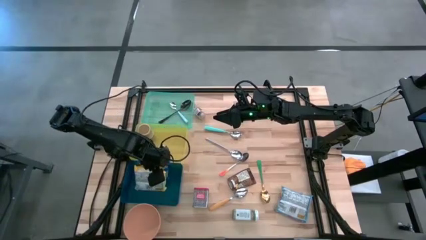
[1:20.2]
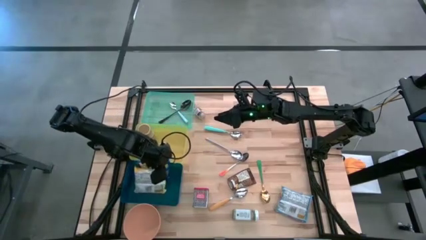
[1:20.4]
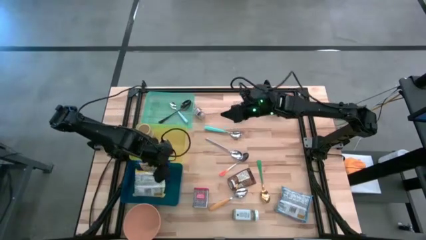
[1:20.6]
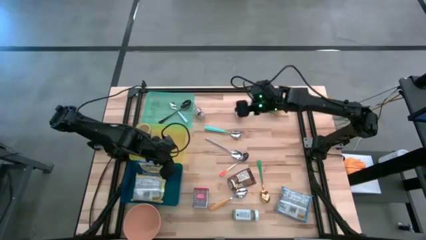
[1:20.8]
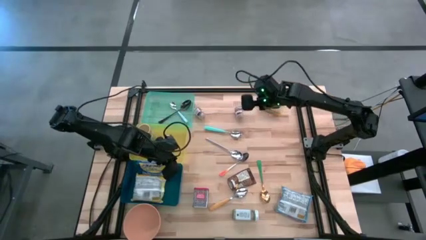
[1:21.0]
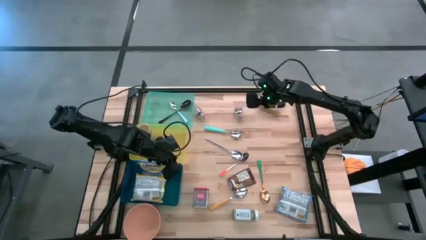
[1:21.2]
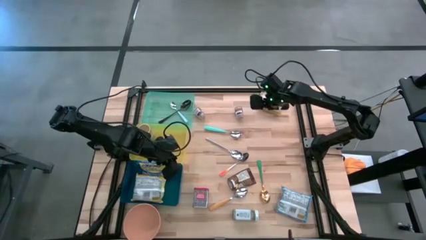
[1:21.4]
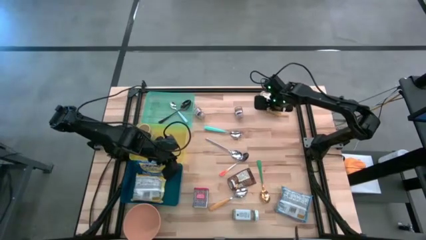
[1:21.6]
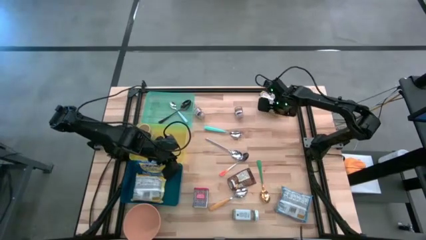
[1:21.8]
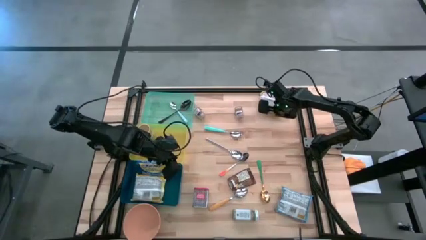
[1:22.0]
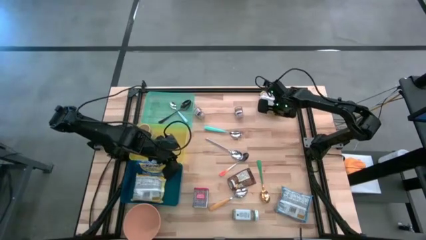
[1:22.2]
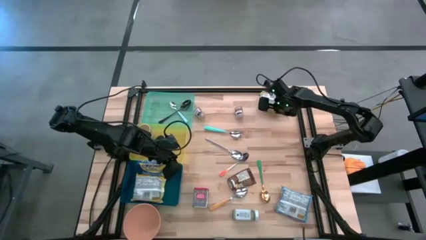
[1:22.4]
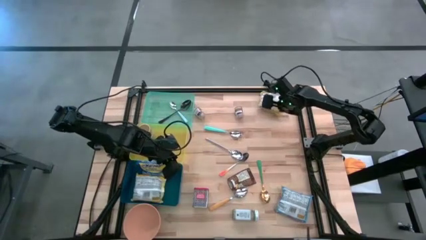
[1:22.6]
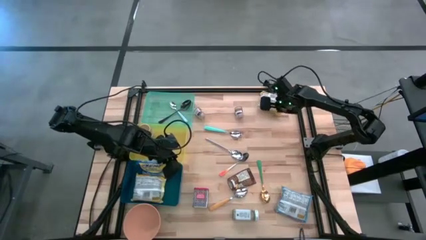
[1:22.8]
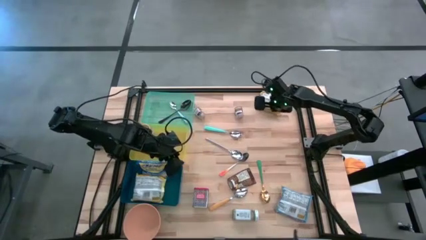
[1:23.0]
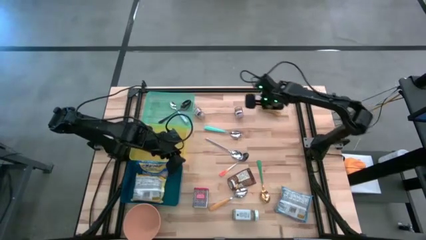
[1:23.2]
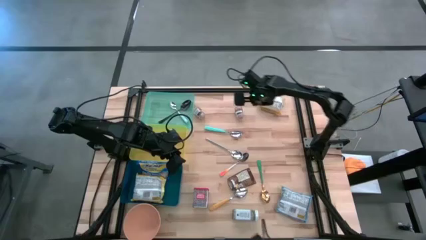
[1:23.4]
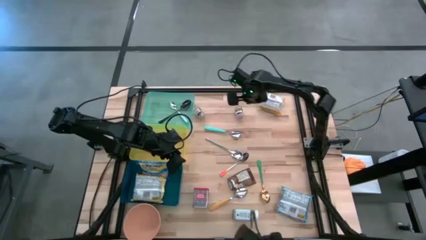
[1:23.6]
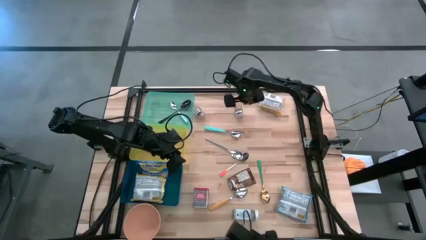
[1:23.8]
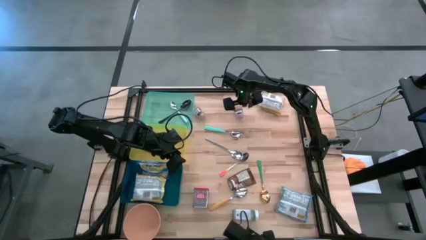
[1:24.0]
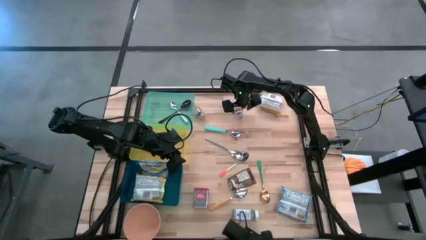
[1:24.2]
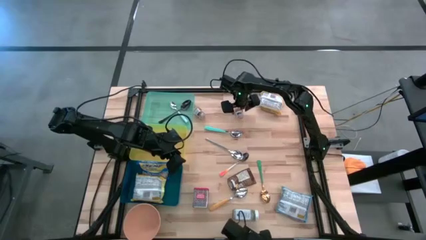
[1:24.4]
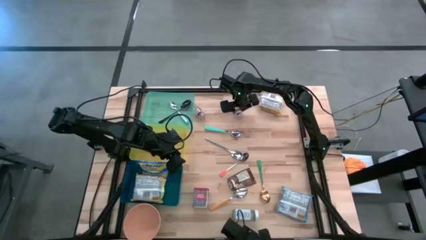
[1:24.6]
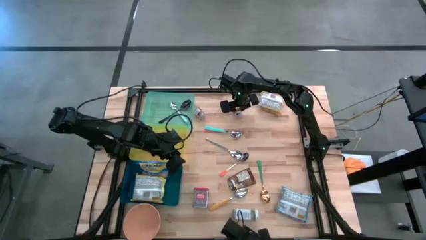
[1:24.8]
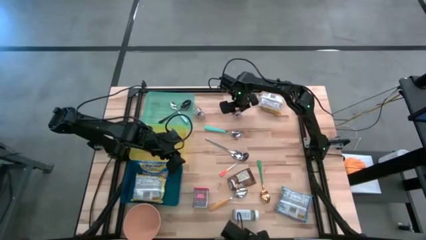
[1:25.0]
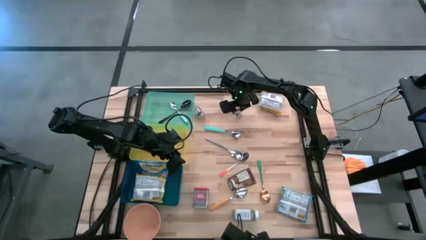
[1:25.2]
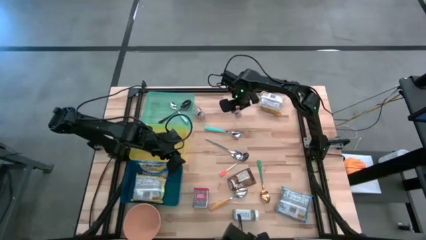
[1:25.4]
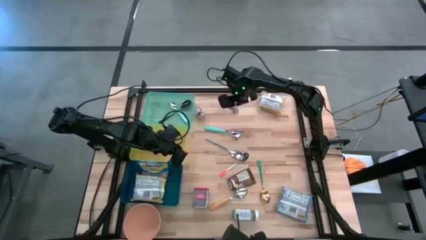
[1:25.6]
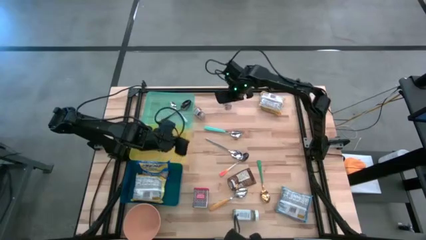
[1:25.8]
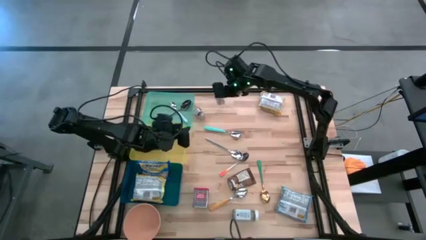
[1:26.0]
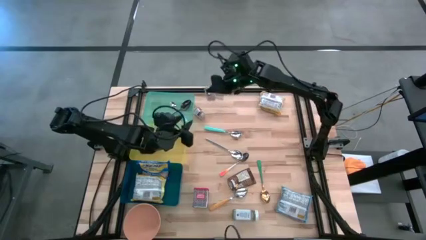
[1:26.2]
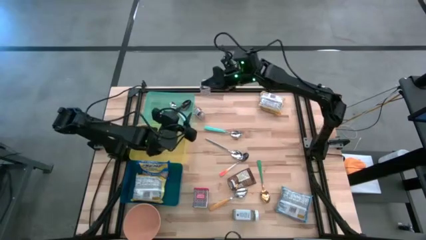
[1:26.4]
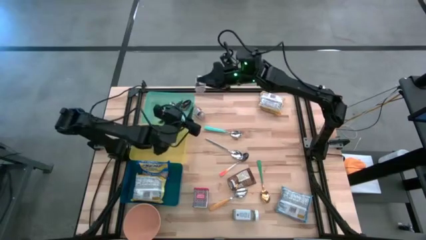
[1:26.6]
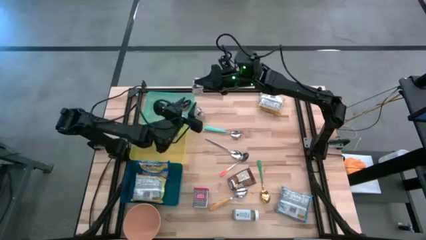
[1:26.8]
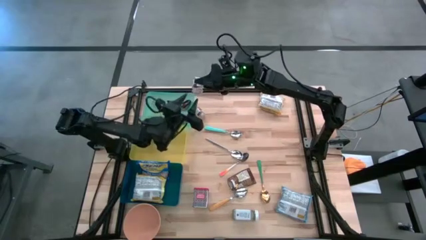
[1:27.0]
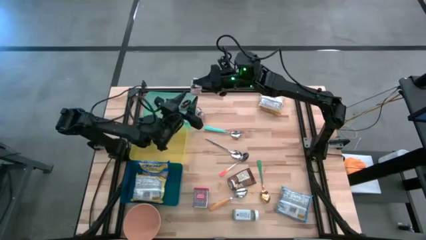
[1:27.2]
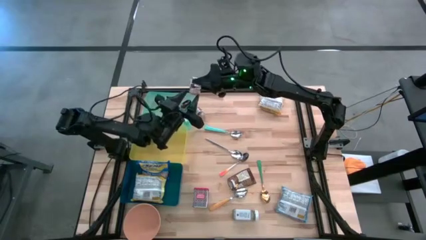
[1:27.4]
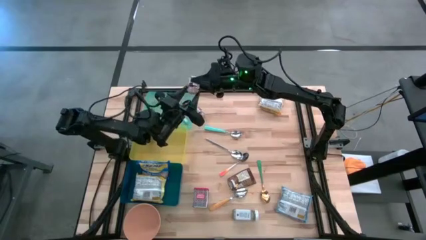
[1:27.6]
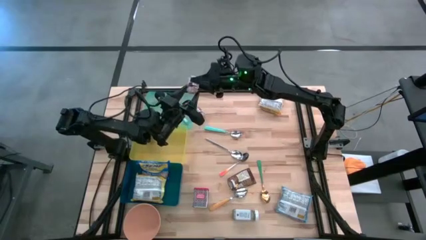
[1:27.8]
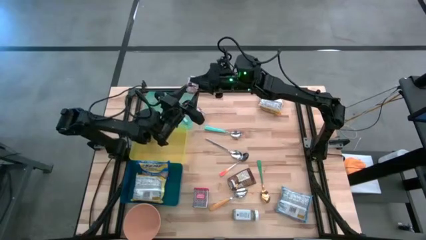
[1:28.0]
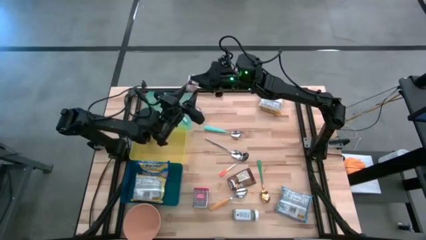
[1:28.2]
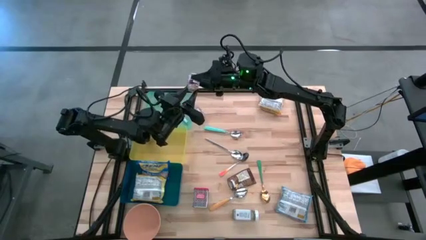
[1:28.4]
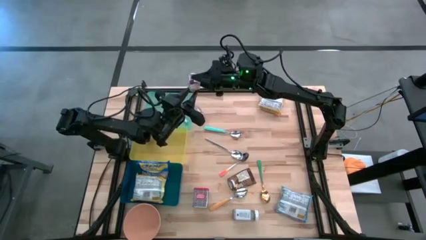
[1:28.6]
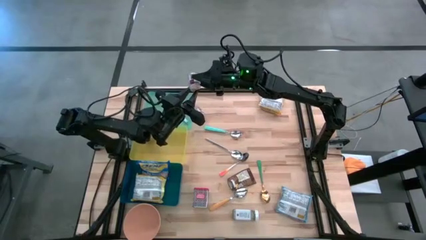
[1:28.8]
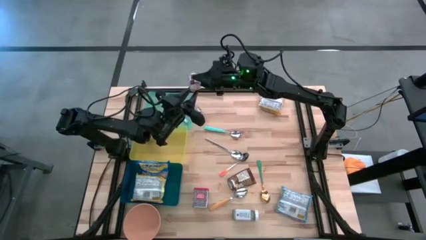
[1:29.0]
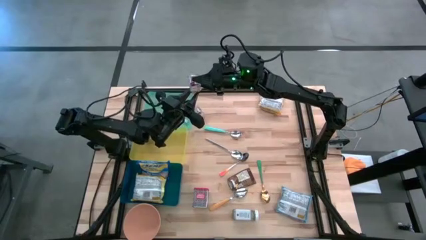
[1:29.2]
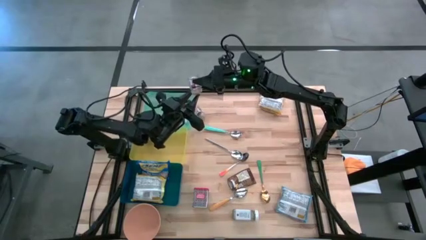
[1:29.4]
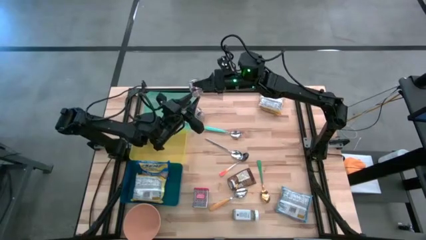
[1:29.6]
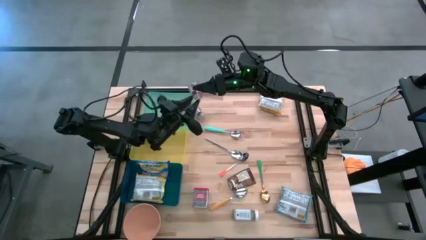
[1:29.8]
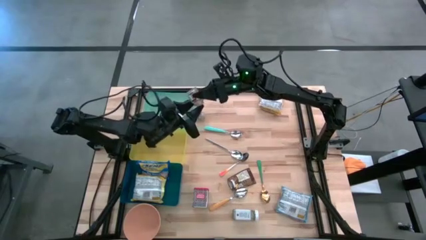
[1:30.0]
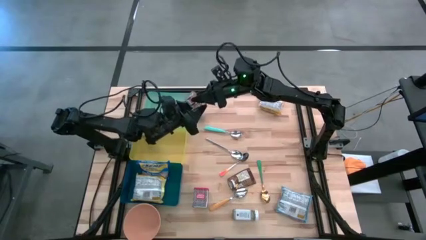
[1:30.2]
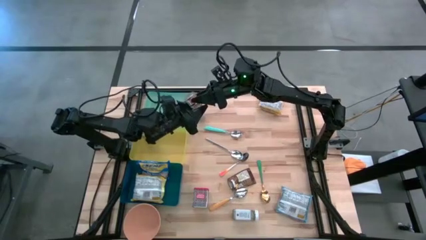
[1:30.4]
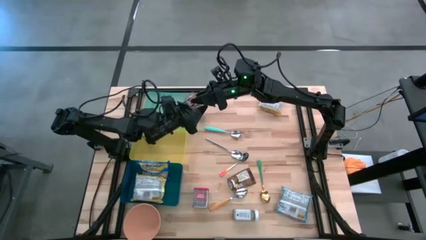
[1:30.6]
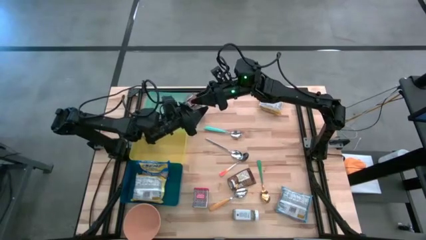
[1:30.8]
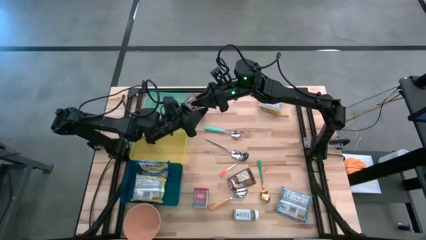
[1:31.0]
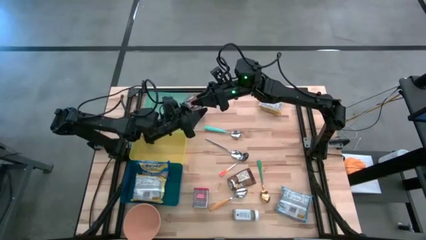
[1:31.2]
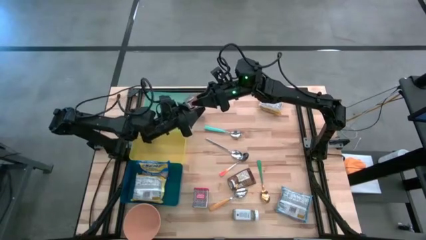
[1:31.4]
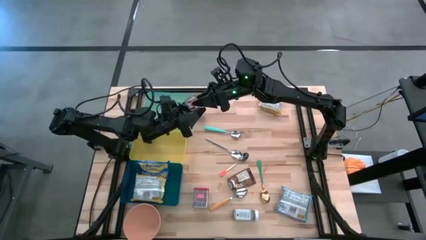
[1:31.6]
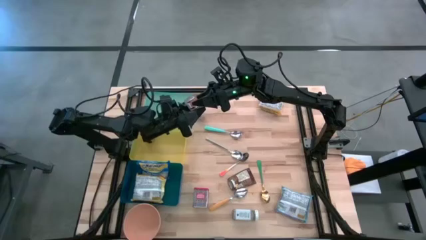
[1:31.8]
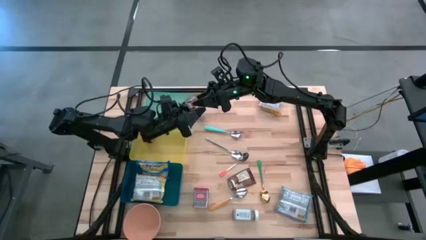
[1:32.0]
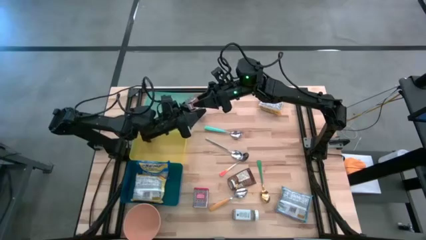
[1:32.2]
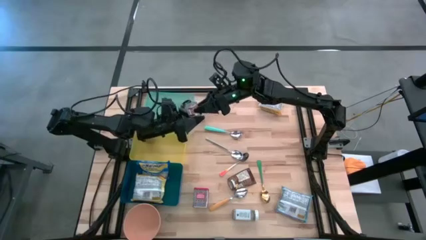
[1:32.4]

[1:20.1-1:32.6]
Put the right brown seasoning bottle into the yellow bin
